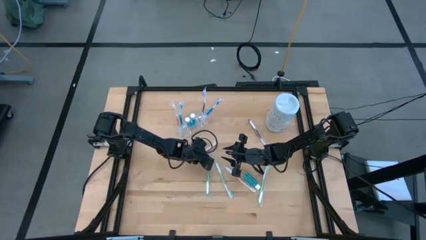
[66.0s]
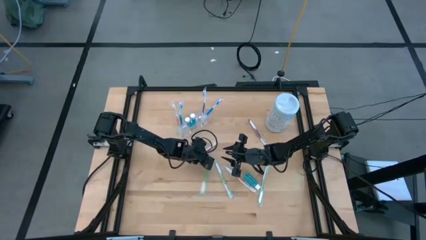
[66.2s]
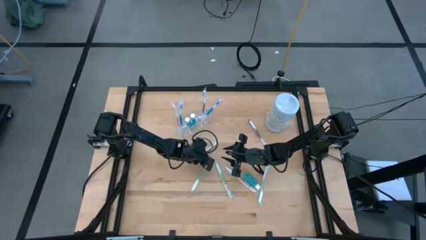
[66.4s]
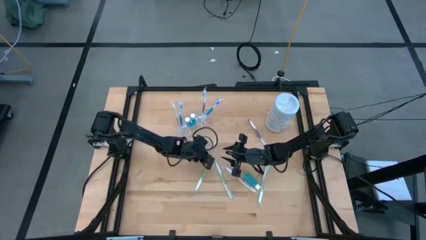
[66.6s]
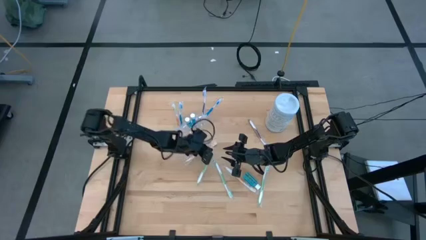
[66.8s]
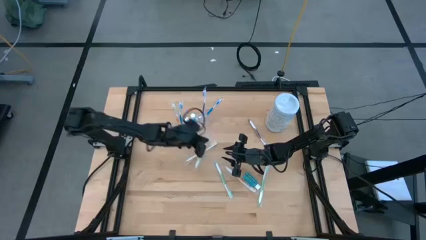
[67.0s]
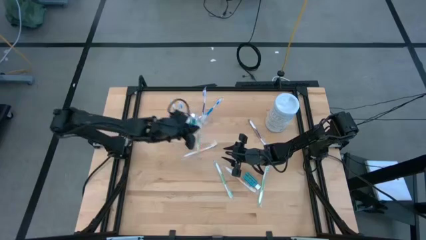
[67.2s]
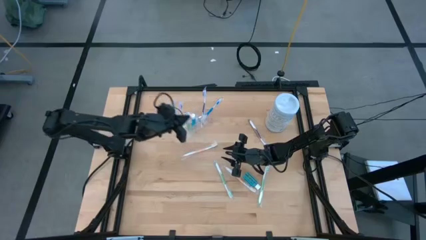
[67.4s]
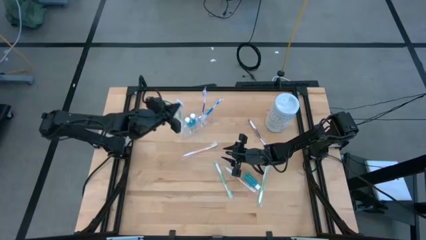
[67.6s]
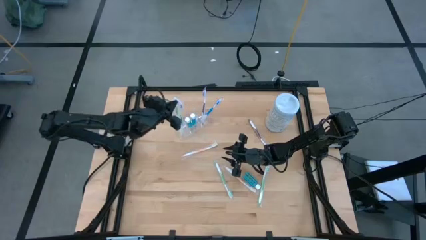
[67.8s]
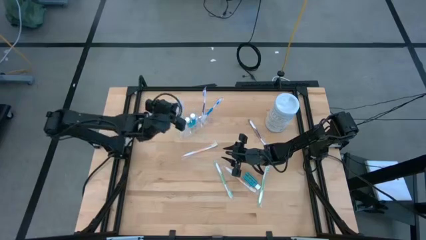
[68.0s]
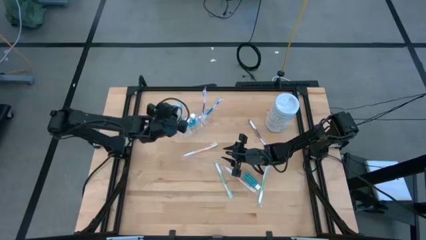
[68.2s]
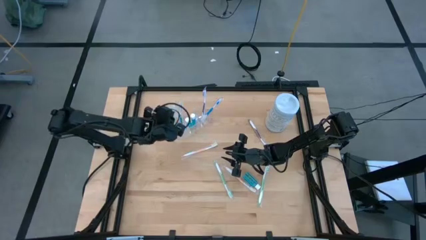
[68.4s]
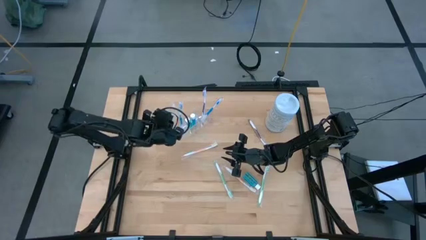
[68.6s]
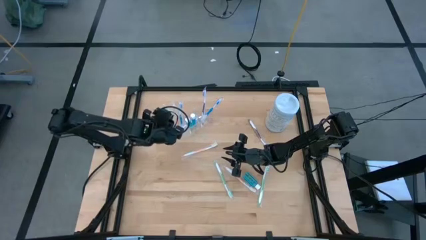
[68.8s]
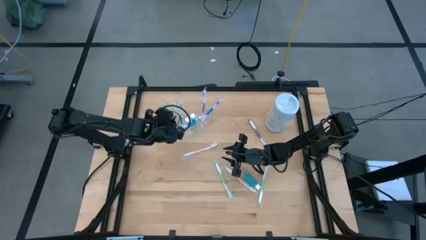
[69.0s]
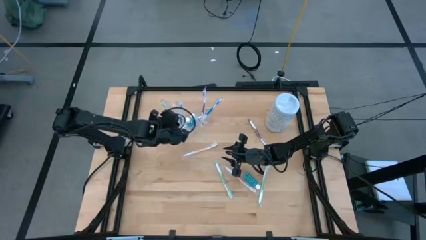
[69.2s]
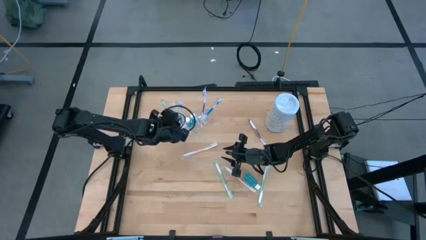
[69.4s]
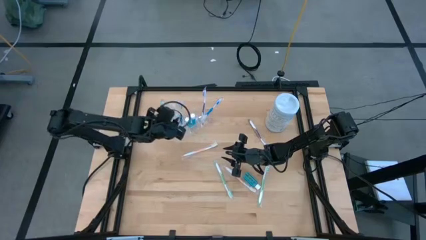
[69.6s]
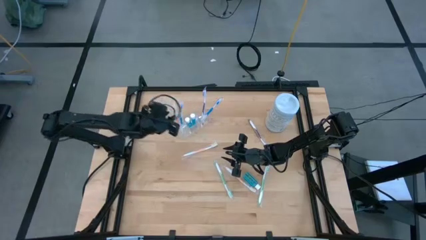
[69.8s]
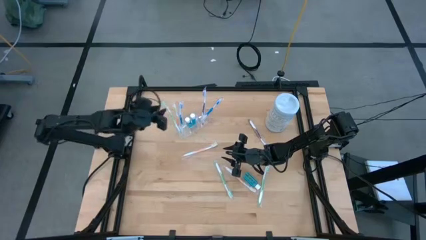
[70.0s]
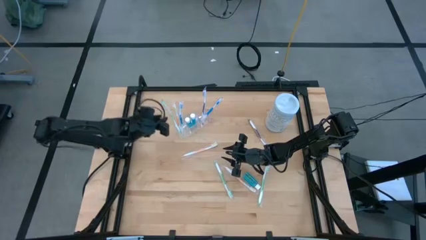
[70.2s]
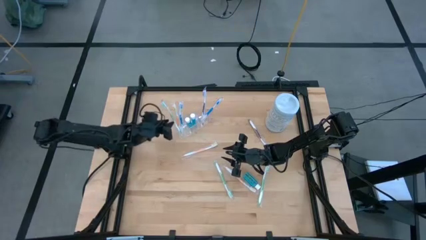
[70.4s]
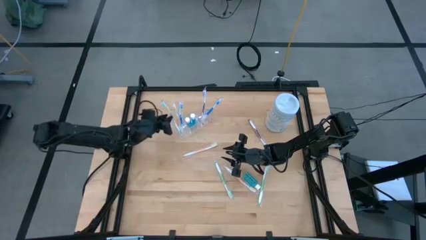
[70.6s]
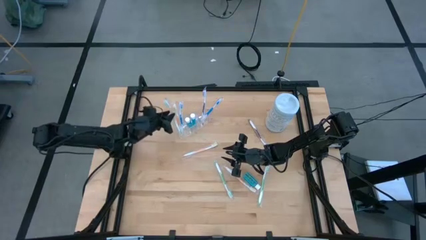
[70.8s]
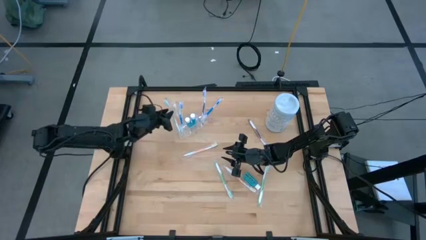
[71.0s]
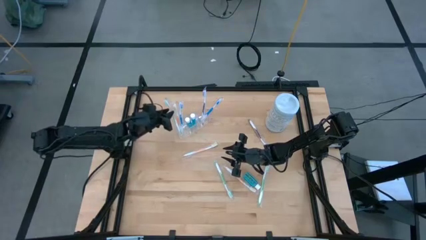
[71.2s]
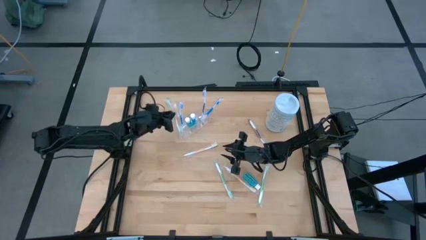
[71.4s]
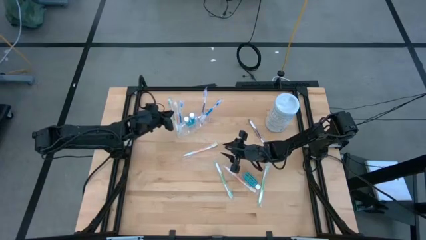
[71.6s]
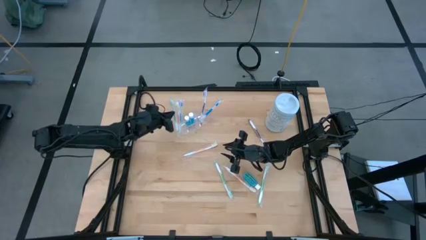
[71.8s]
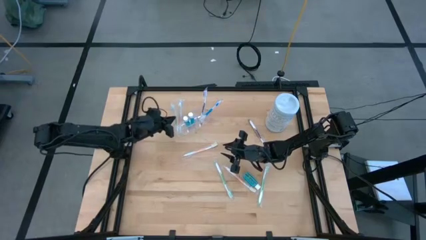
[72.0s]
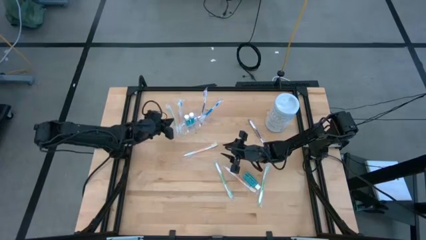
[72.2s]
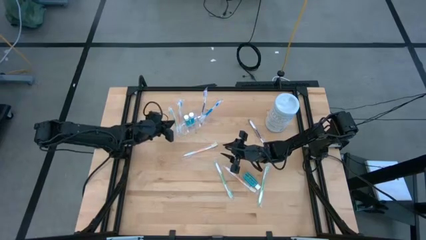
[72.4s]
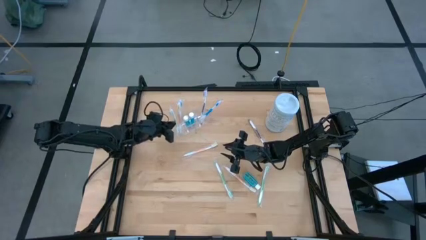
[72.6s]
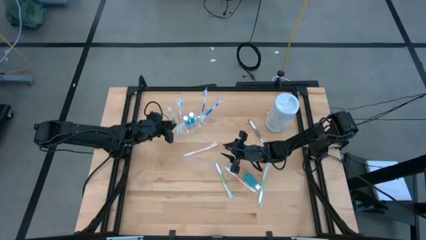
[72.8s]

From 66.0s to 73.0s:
Task: Pick & Place toothbrushing station
Put the left green toothbrush into the transparent organizer

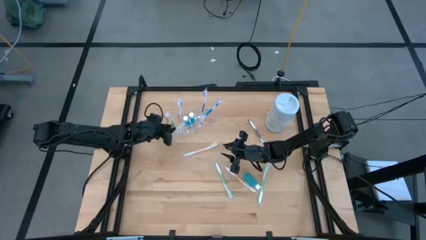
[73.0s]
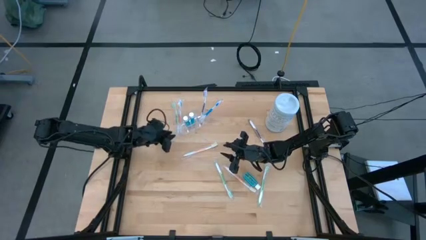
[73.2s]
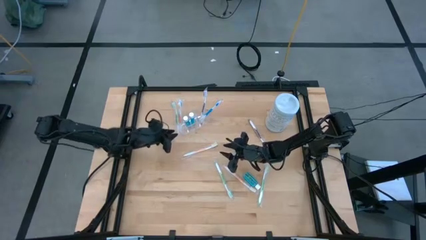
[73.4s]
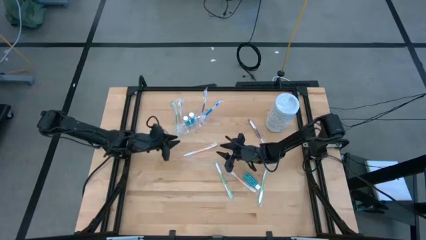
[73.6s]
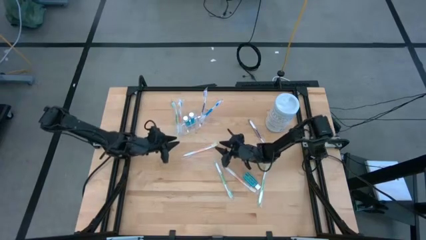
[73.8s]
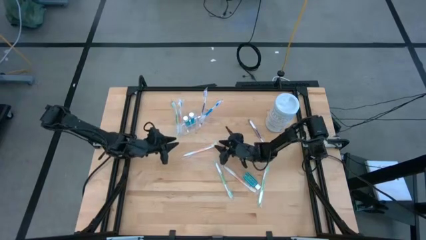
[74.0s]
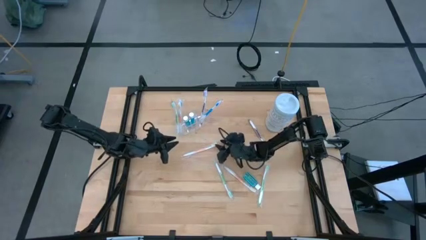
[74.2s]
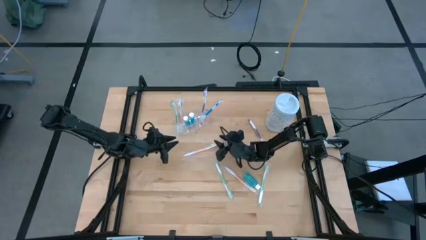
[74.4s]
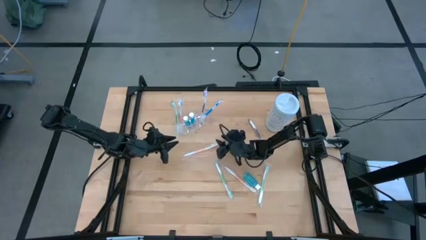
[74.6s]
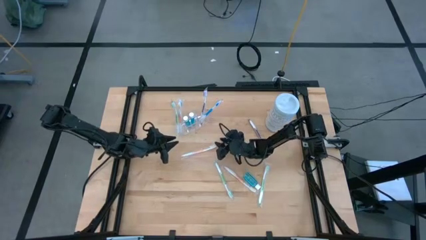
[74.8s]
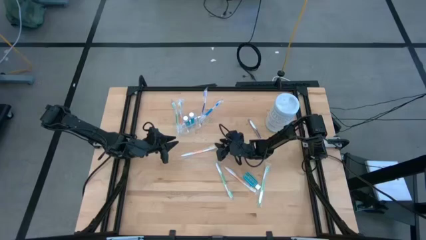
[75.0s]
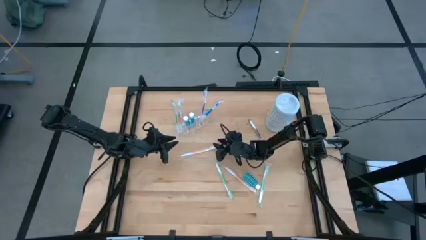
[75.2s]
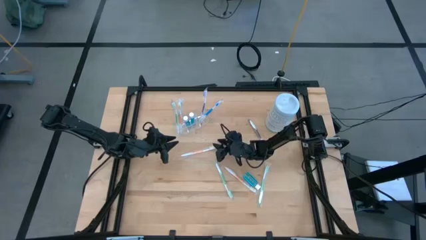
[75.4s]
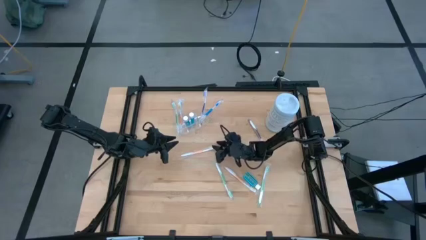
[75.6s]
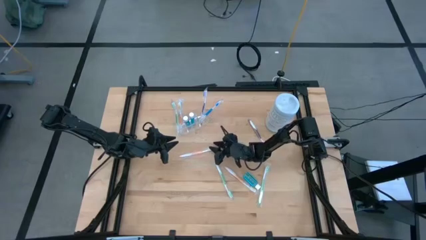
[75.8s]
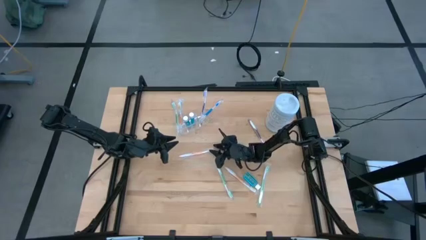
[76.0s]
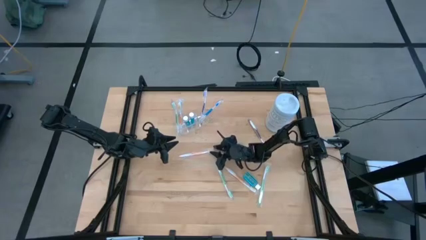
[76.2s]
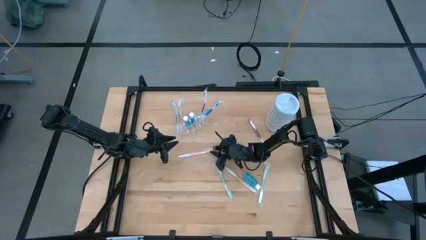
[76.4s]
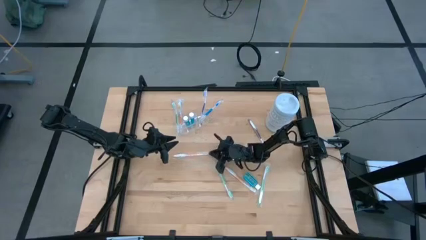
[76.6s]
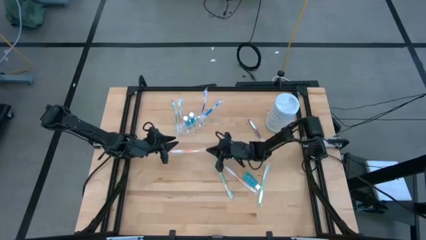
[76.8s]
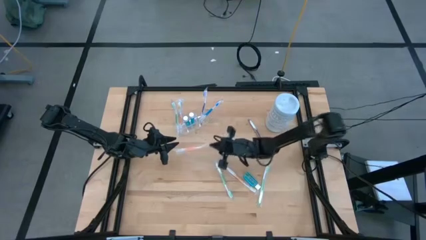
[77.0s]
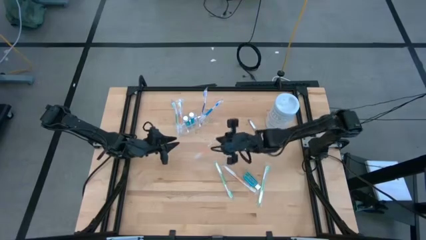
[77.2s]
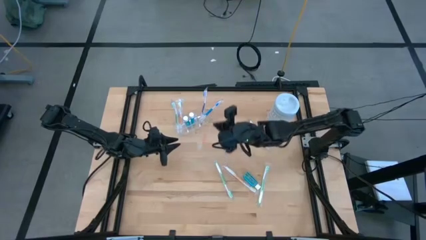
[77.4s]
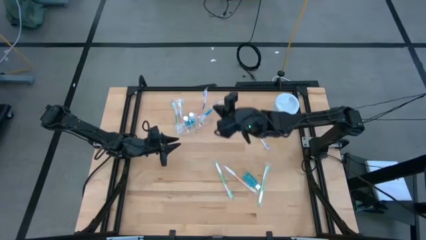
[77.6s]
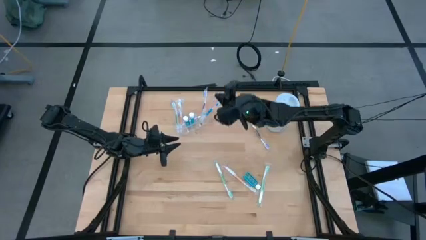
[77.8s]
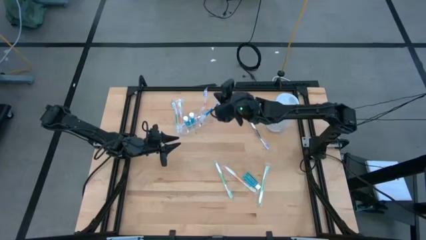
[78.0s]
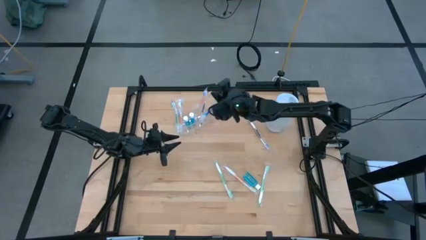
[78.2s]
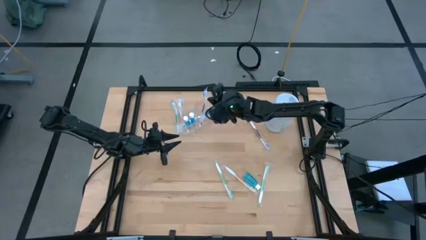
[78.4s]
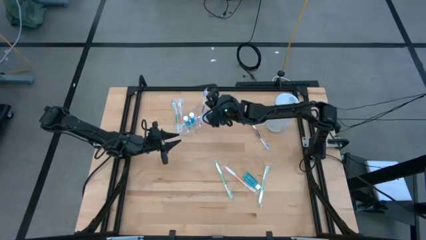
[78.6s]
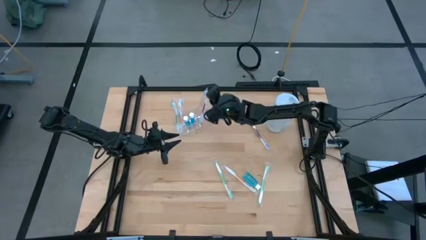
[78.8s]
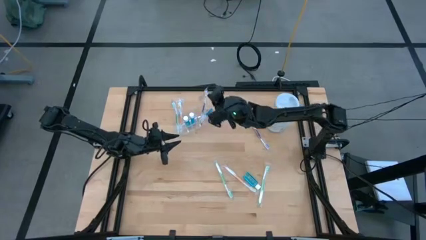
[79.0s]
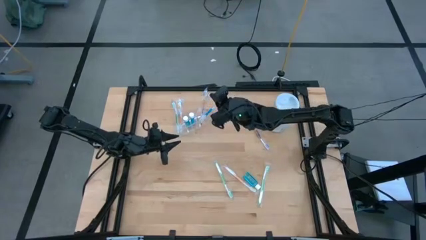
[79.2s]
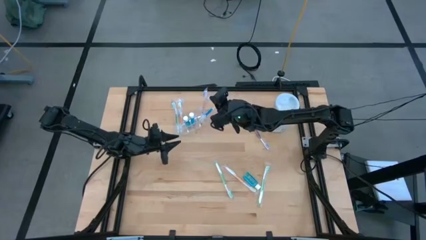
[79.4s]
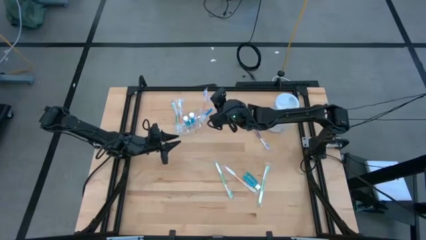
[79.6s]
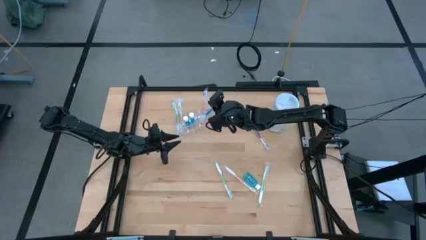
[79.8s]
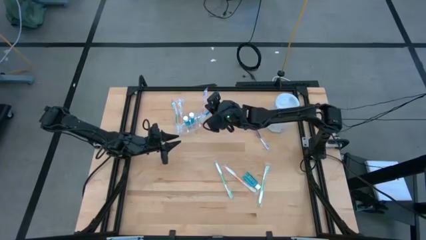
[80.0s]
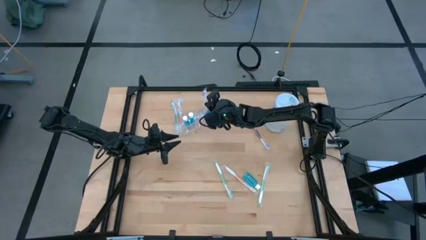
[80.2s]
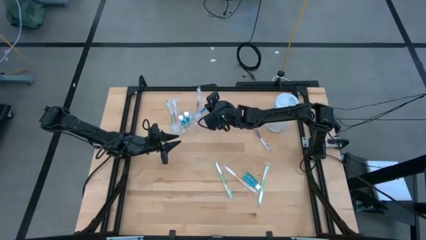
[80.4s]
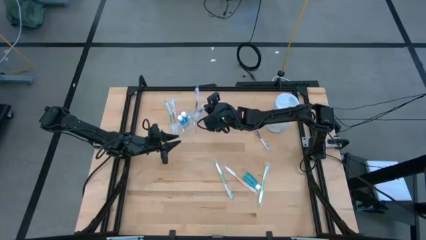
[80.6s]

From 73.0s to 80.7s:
Put the top orange toothbrush into the transparent organizer

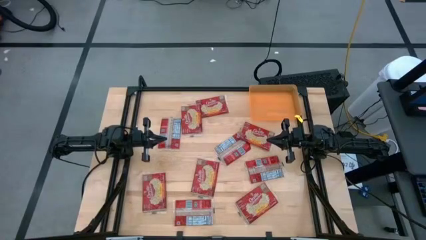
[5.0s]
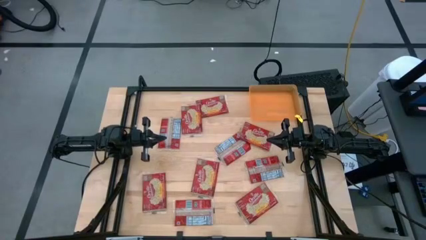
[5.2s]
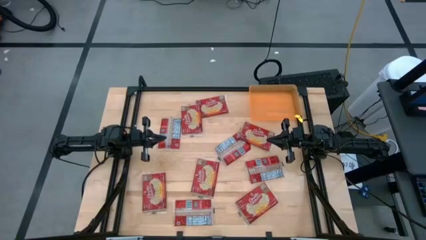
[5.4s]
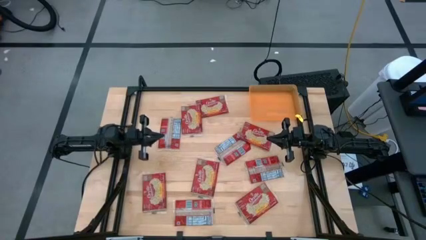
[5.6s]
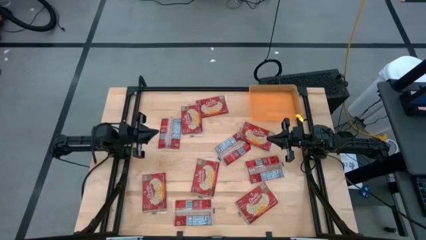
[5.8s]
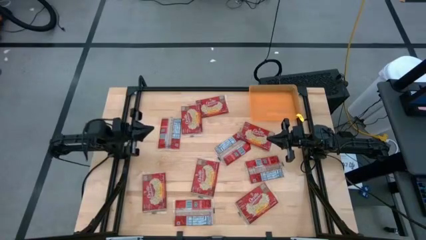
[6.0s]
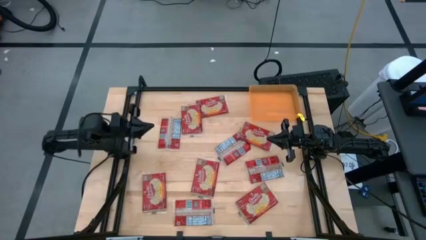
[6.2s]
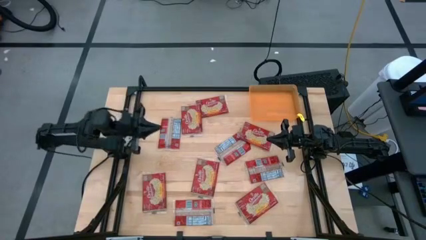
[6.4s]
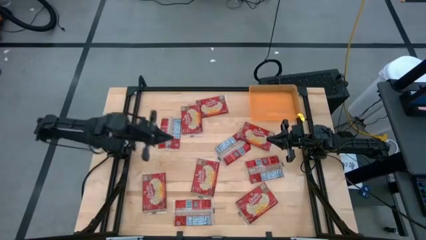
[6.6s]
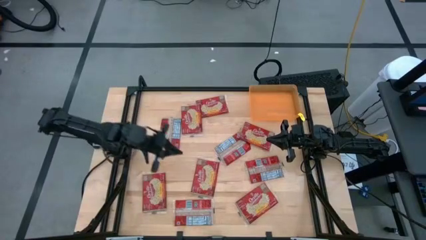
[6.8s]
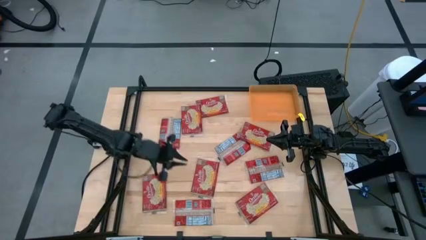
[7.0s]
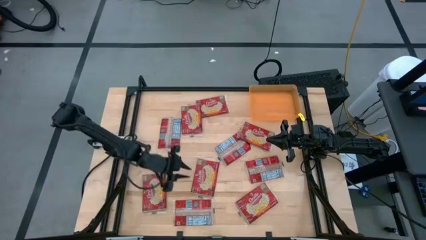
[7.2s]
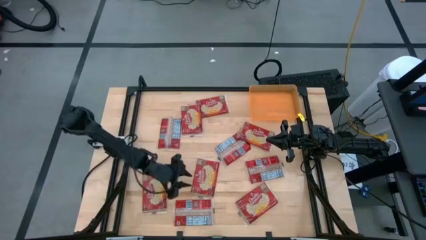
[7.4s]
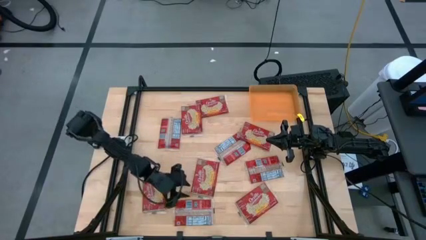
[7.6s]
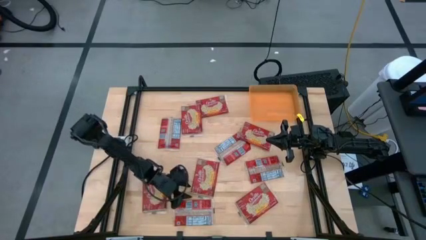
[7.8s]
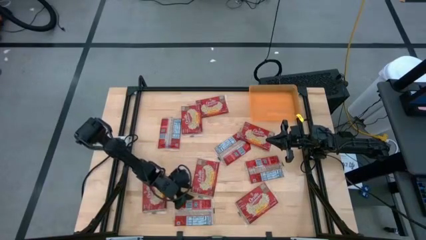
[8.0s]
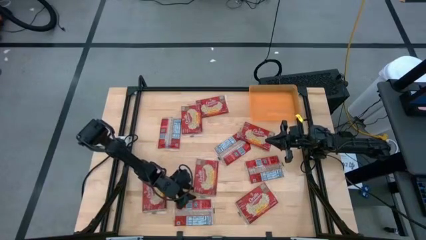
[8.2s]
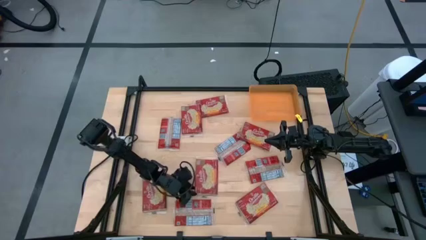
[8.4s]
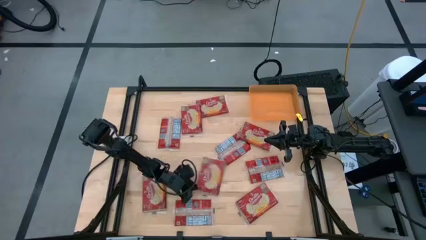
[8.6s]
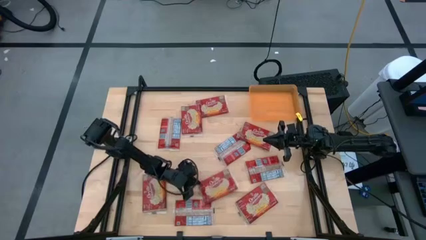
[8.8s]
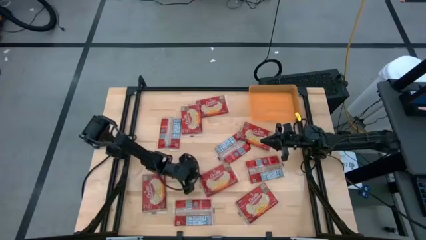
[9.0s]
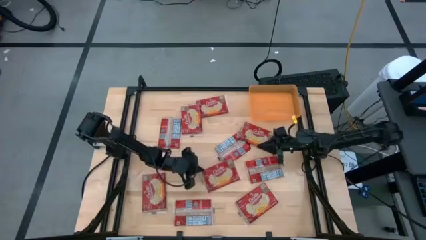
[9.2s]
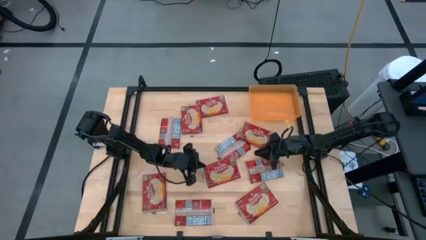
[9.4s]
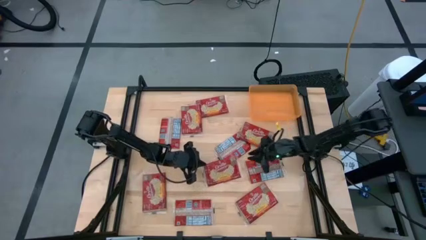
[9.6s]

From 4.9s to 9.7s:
Task: Sort popcorn bags into baskets
Put the red popcorn bag into the orange bin
